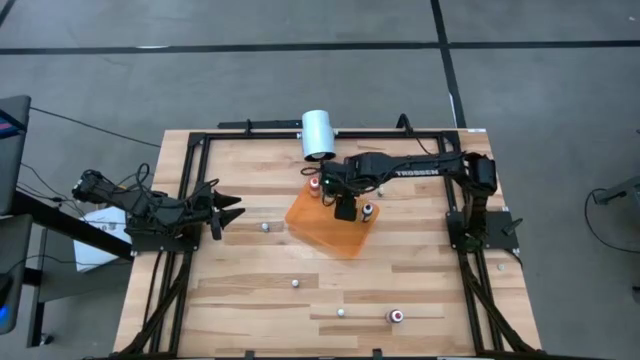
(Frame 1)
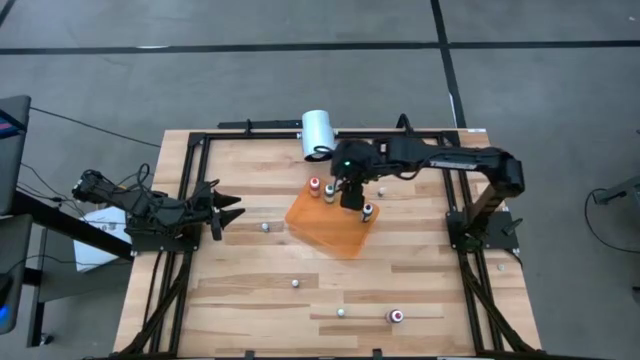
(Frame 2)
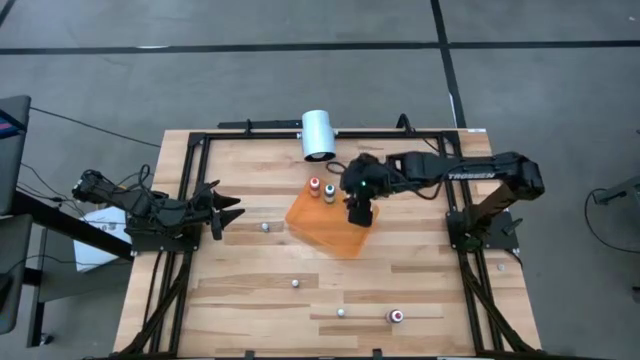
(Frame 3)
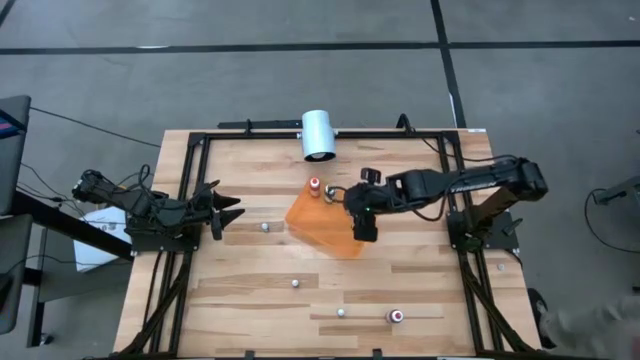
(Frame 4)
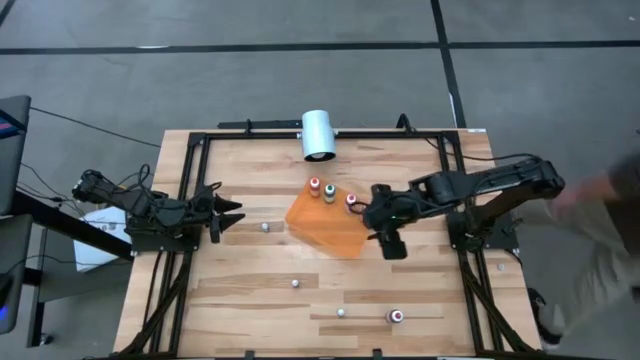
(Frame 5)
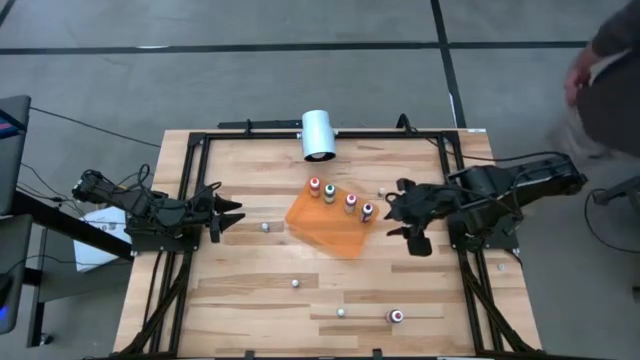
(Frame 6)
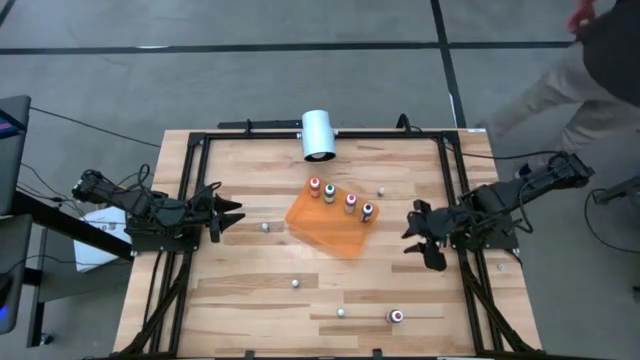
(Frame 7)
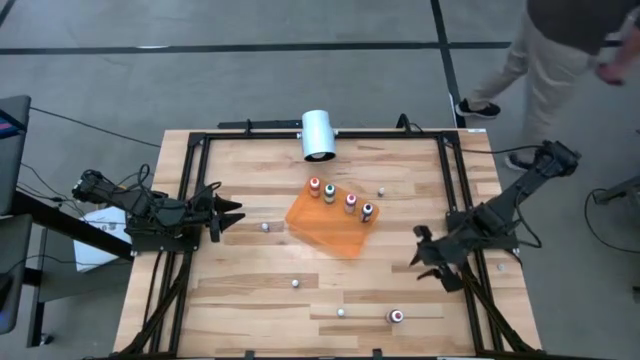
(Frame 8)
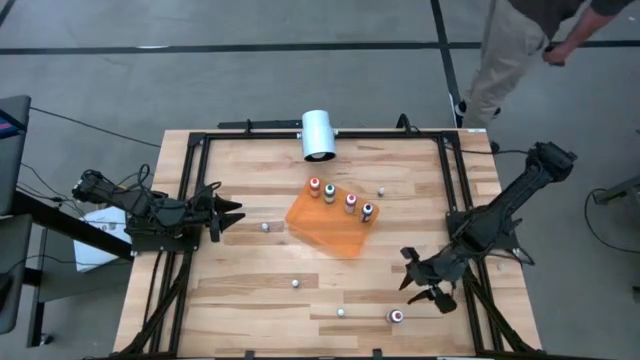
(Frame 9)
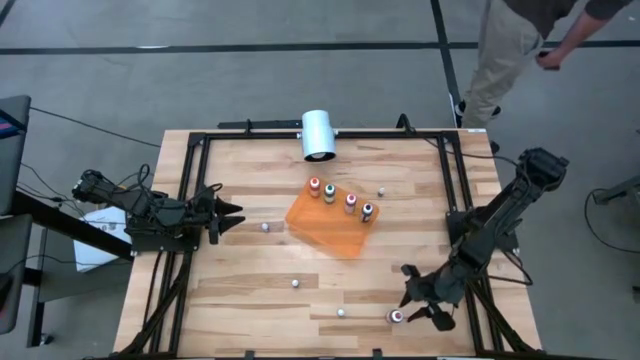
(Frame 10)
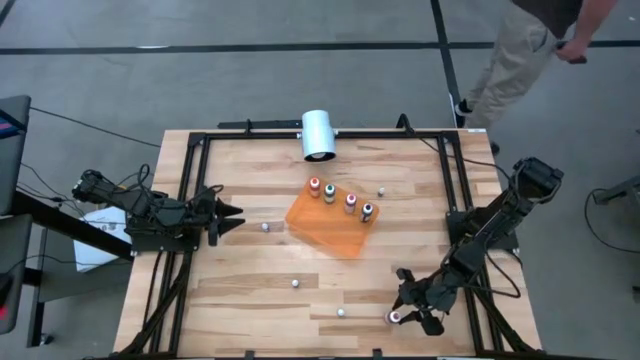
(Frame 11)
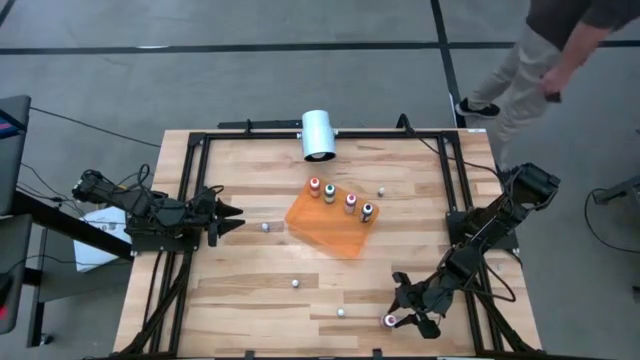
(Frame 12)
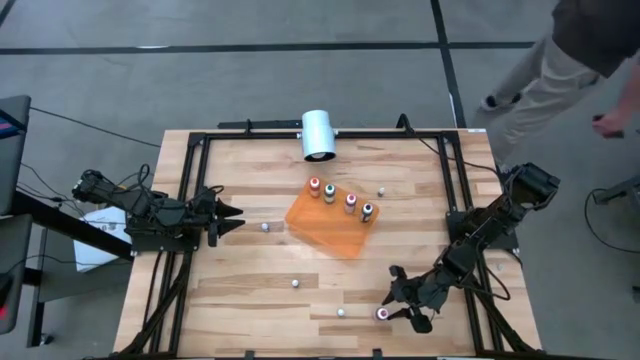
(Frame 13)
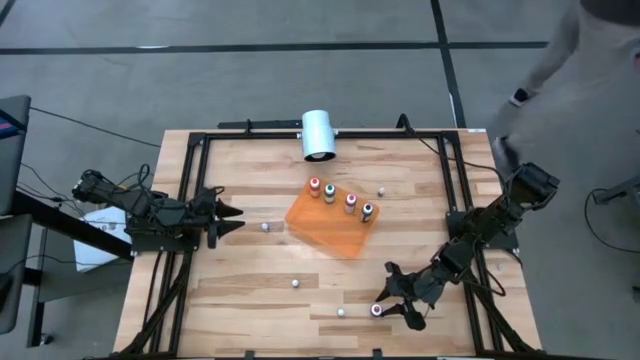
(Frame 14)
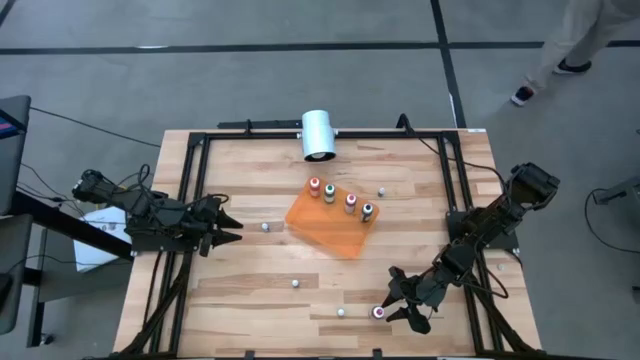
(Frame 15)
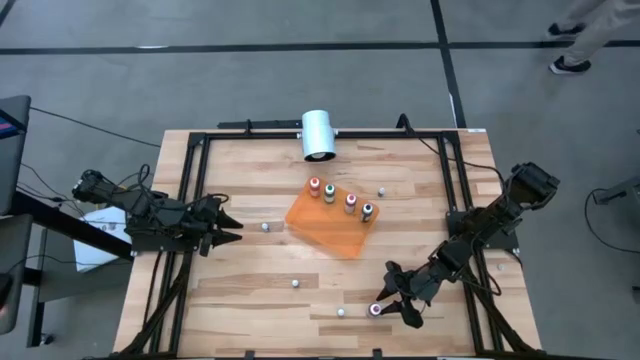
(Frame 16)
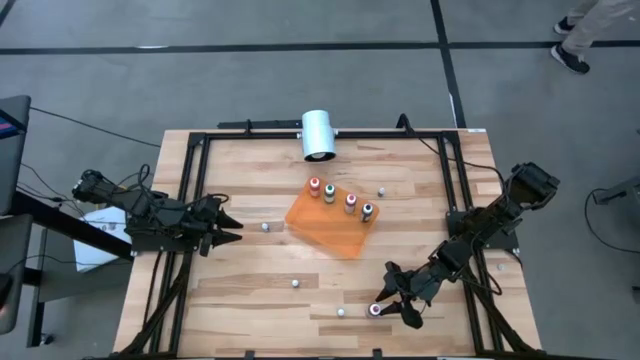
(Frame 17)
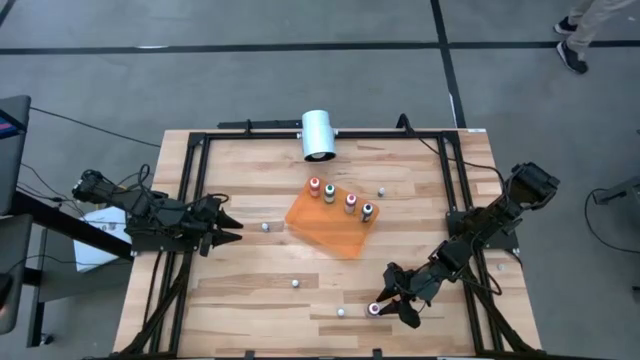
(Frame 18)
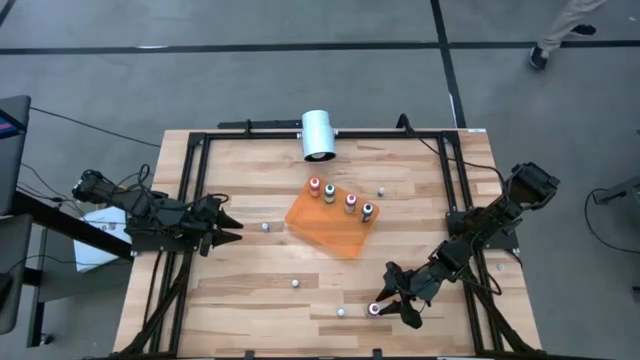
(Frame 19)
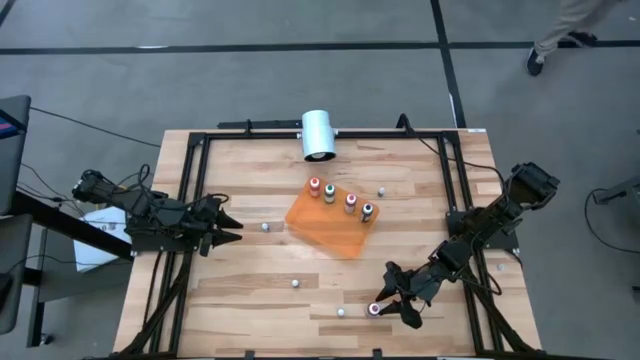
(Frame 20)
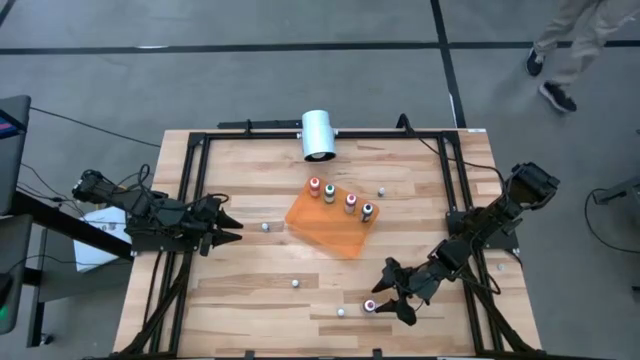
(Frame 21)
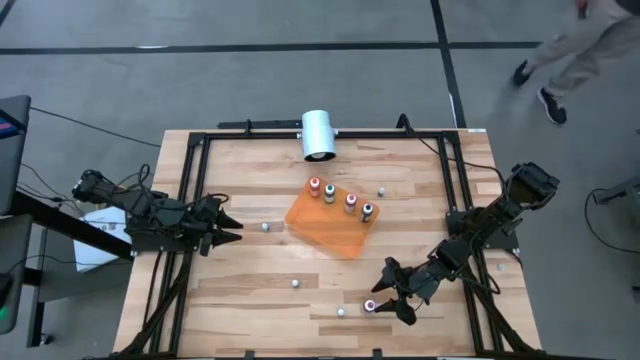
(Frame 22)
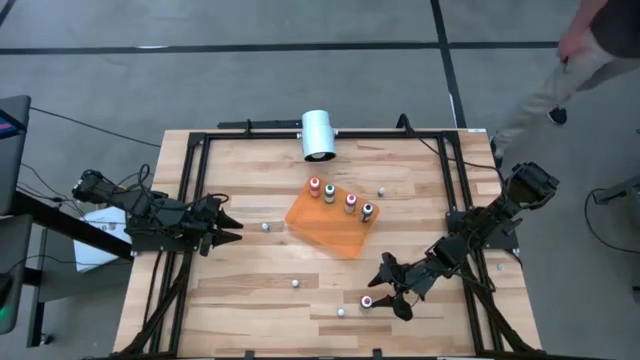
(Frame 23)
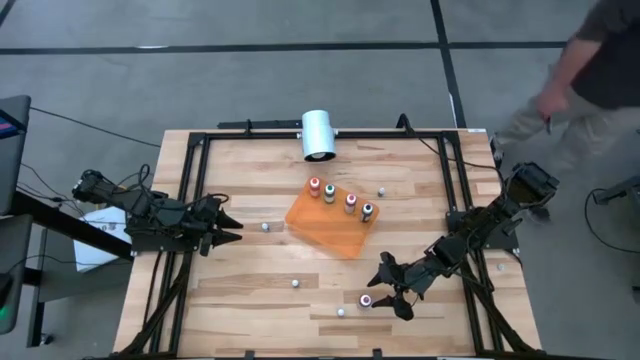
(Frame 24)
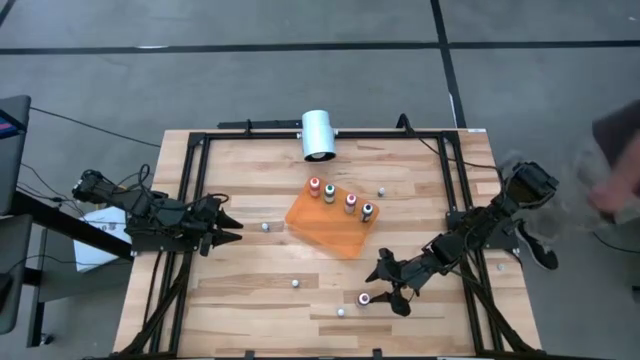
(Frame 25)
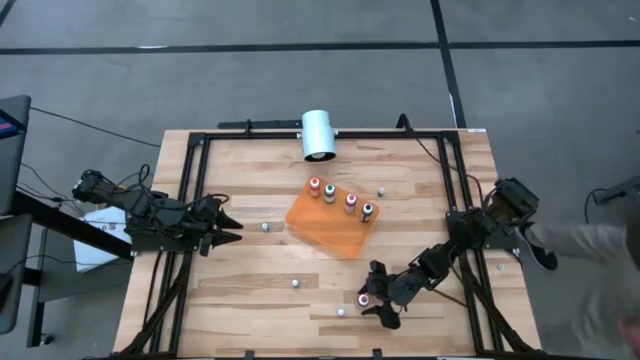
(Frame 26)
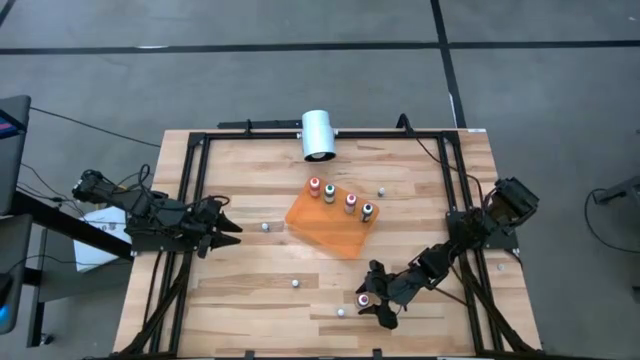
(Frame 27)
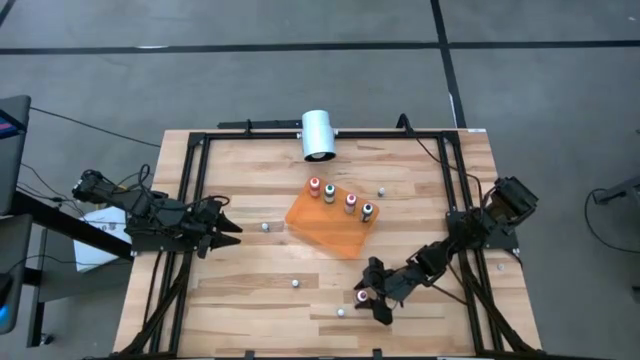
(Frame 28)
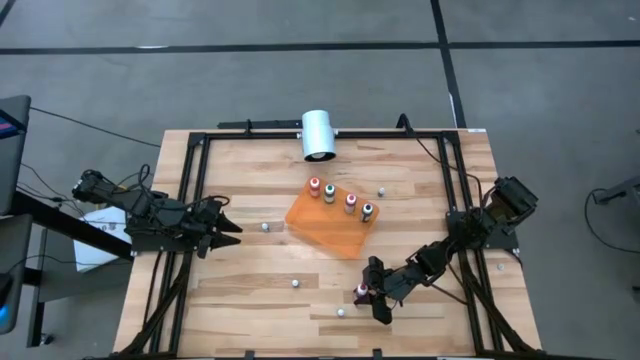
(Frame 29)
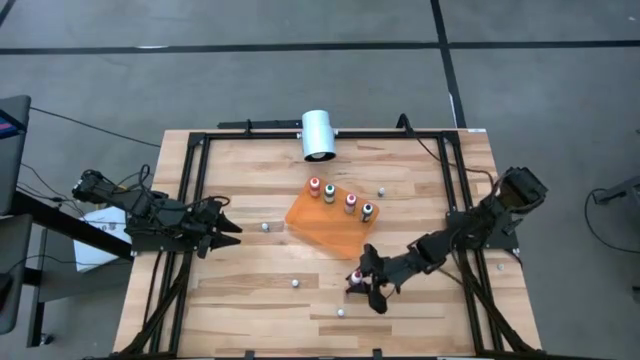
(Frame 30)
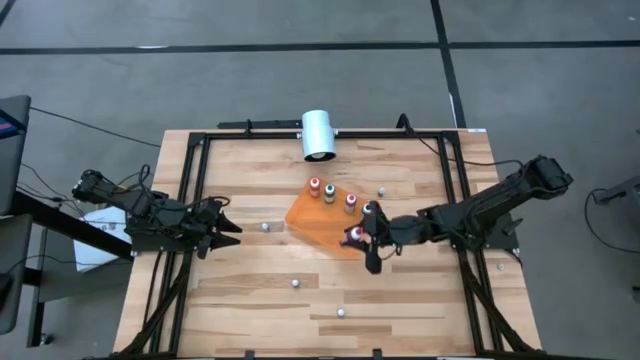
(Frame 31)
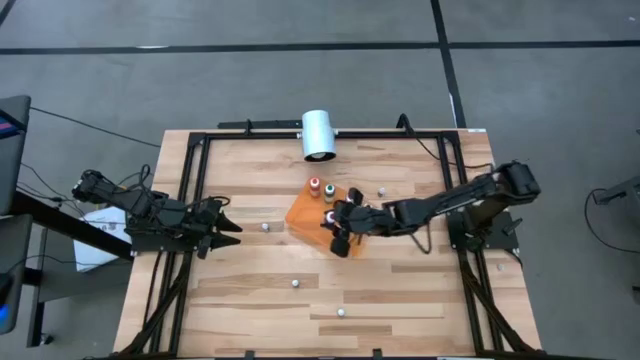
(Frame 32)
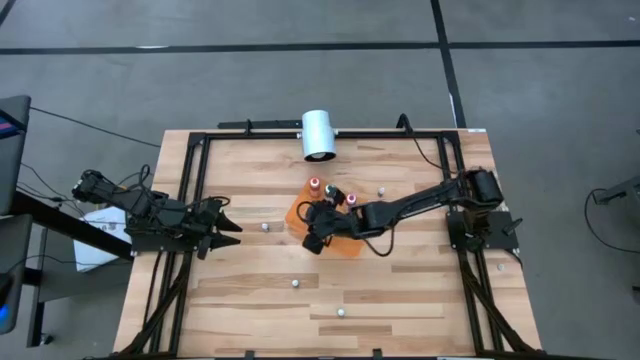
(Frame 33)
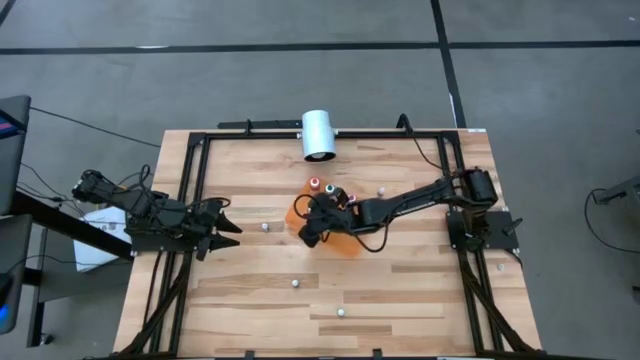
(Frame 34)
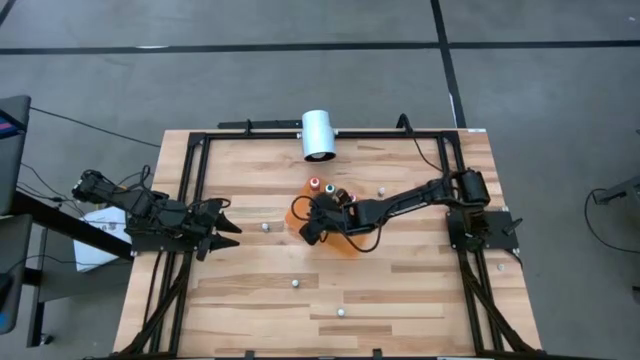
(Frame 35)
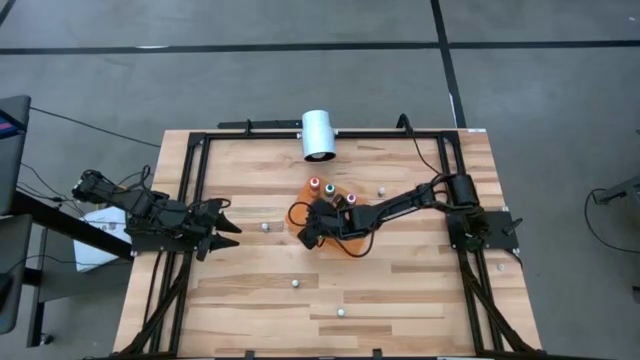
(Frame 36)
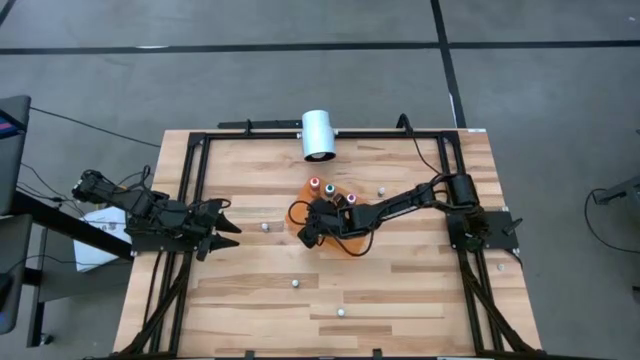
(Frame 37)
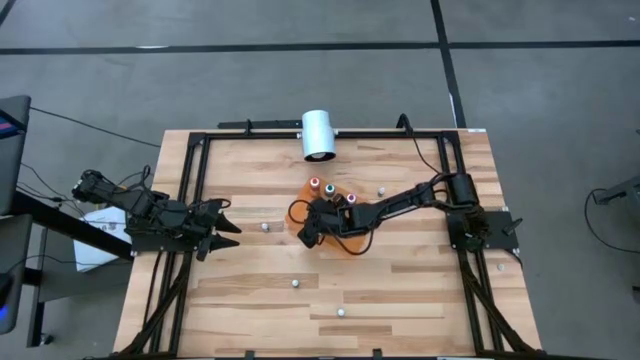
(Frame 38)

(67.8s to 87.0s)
Task: Pick & Place food coloring
Put the red food coloring bottle into the bin

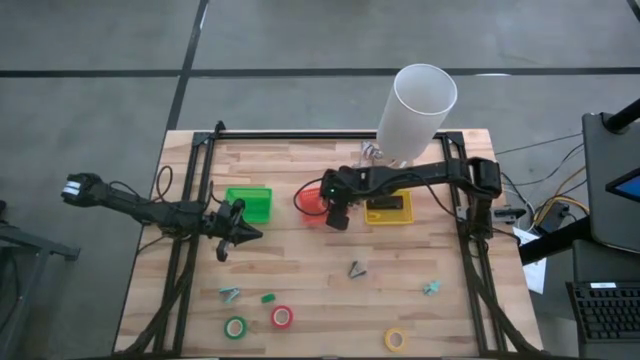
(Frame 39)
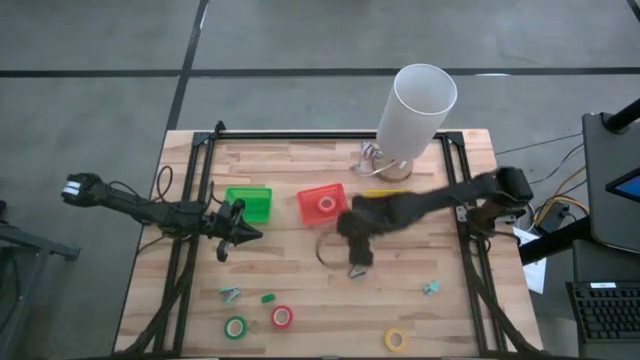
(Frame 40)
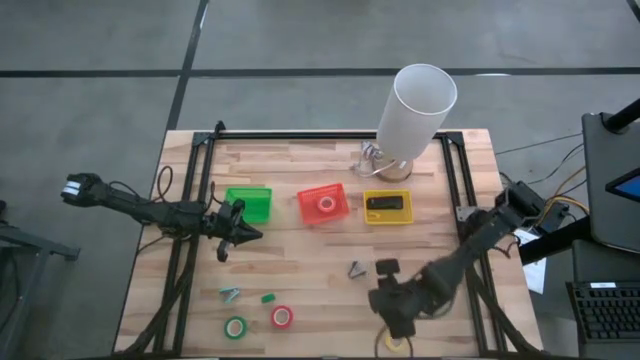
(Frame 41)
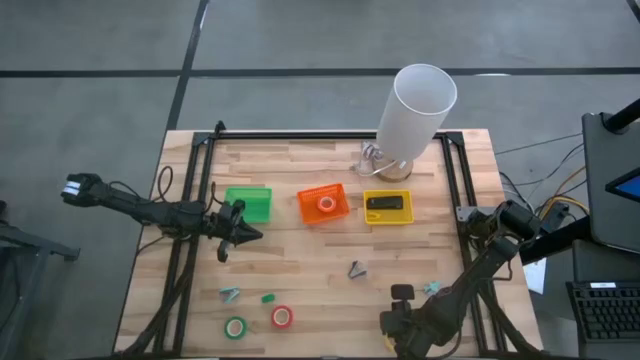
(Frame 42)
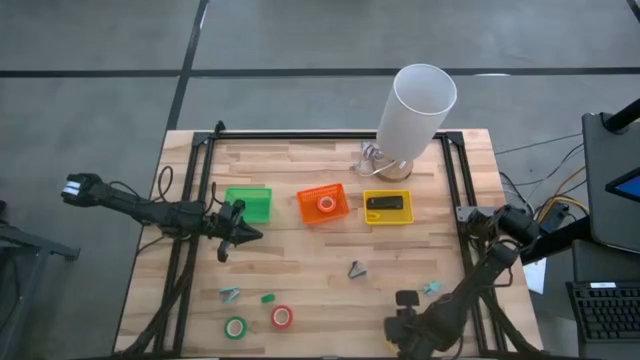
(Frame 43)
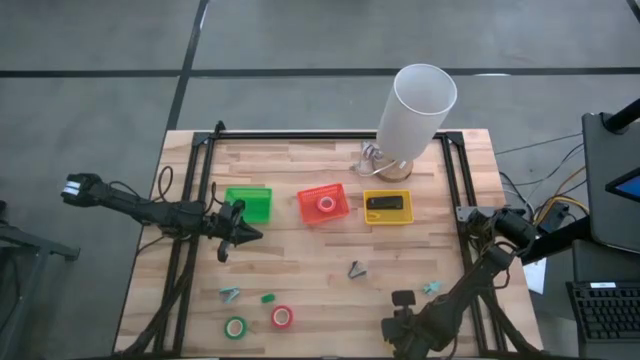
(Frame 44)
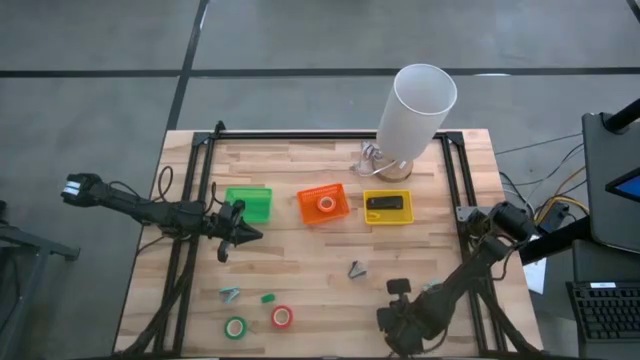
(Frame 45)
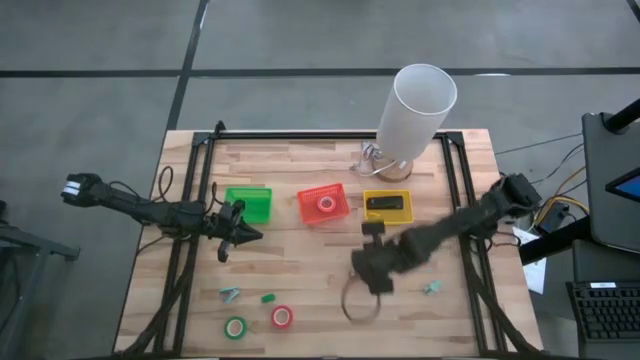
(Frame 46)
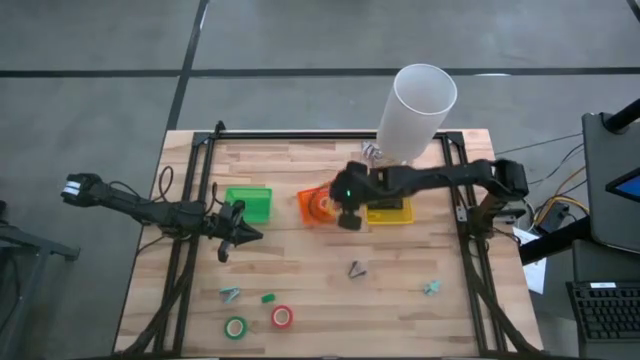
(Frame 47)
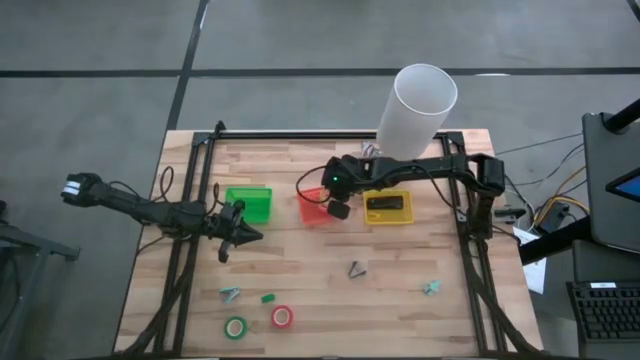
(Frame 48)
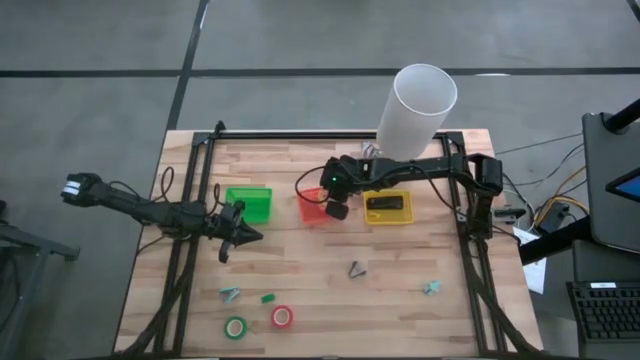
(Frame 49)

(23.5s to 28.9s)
Task: Pick and place Stapler, Stapler remover, tape
Put the yellow tape into the orange basket
